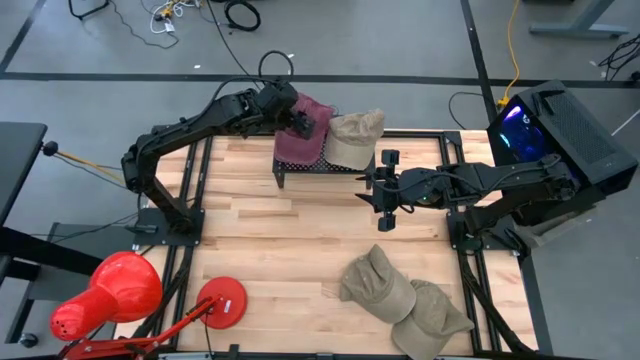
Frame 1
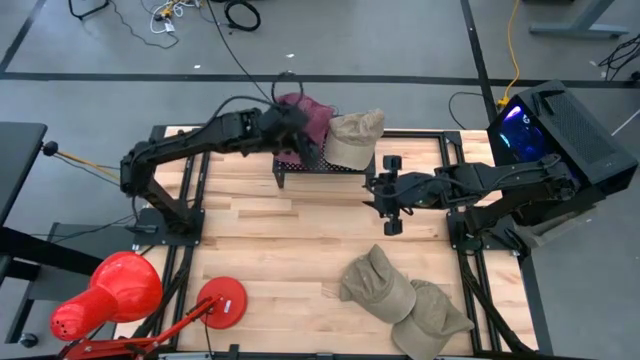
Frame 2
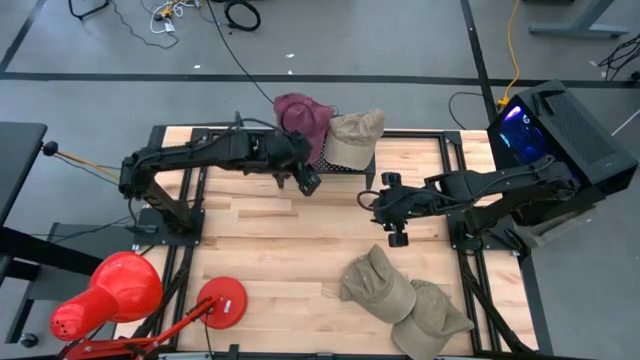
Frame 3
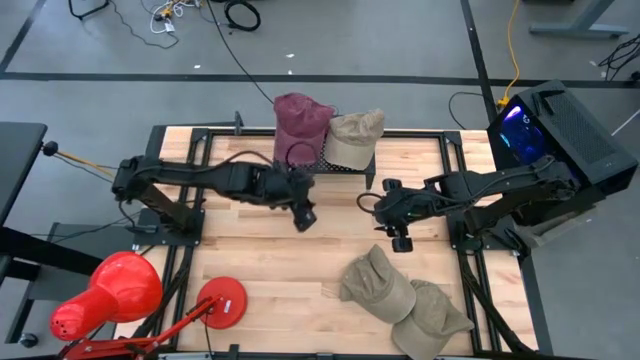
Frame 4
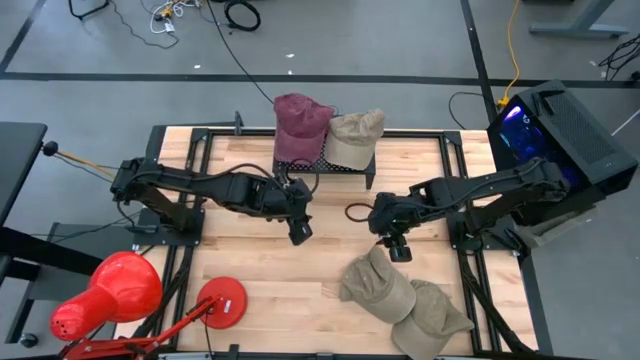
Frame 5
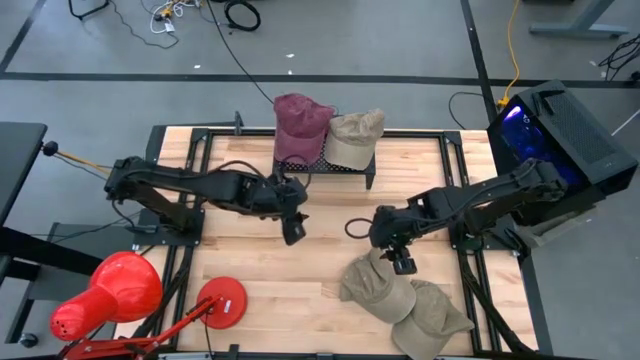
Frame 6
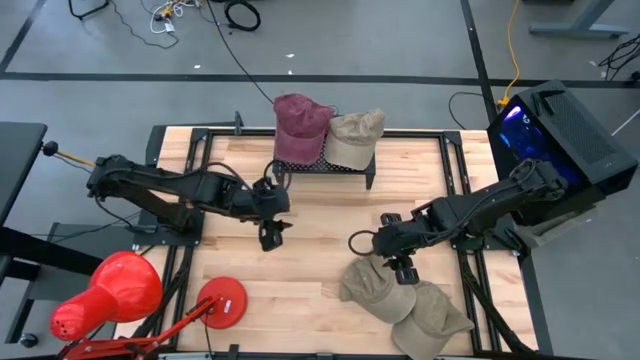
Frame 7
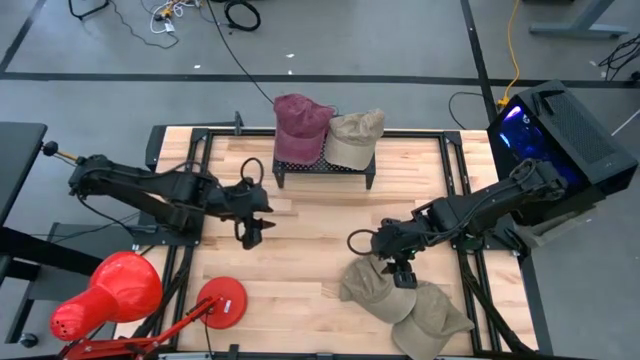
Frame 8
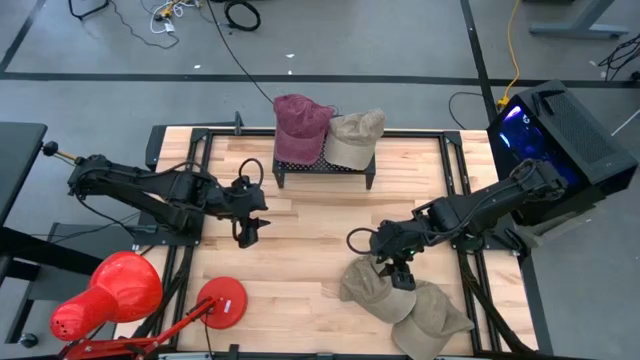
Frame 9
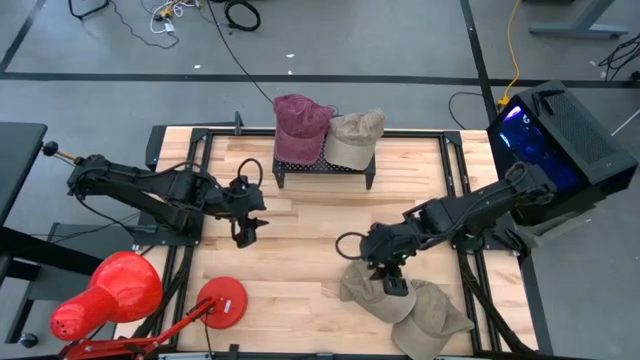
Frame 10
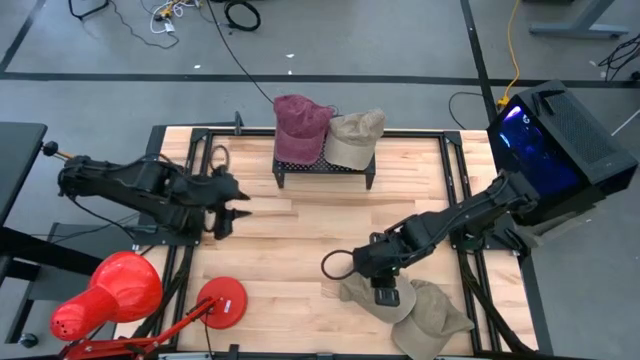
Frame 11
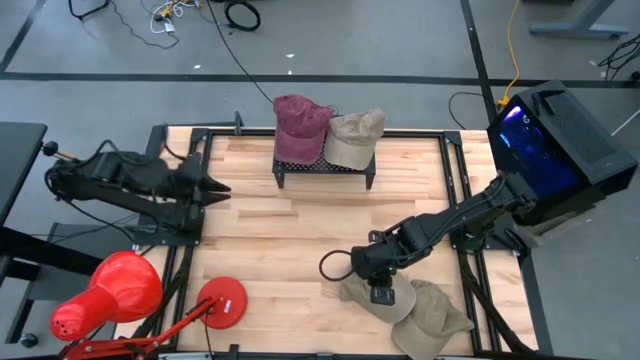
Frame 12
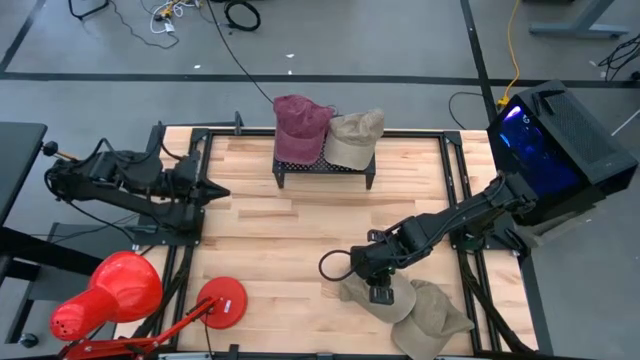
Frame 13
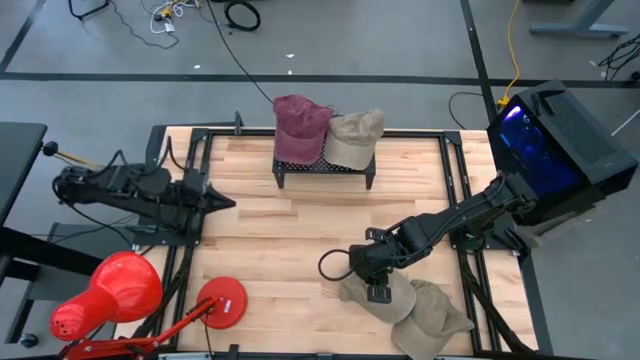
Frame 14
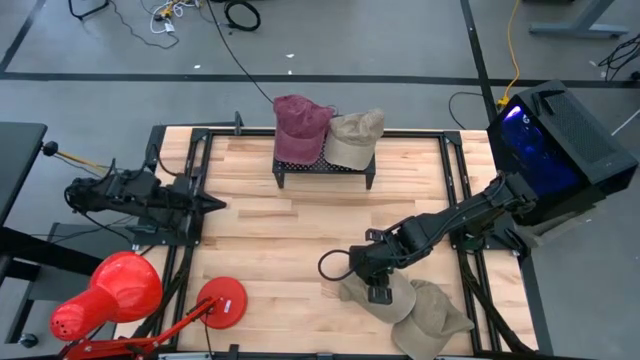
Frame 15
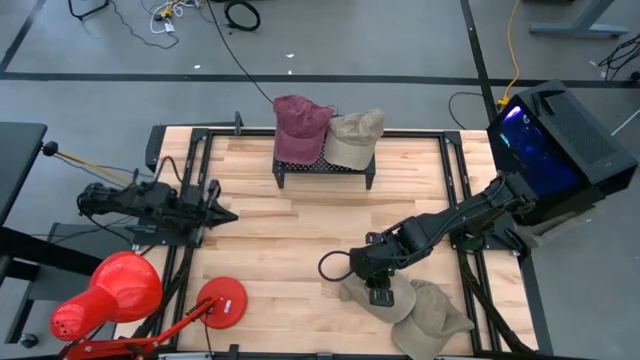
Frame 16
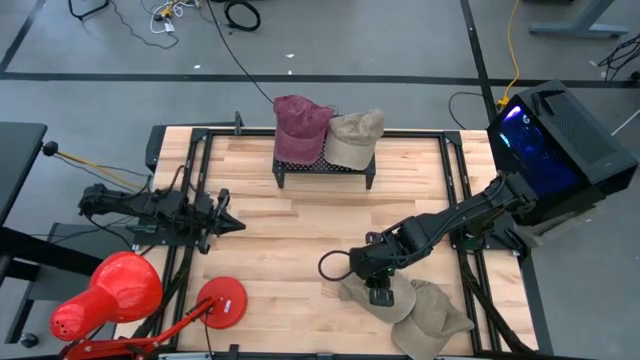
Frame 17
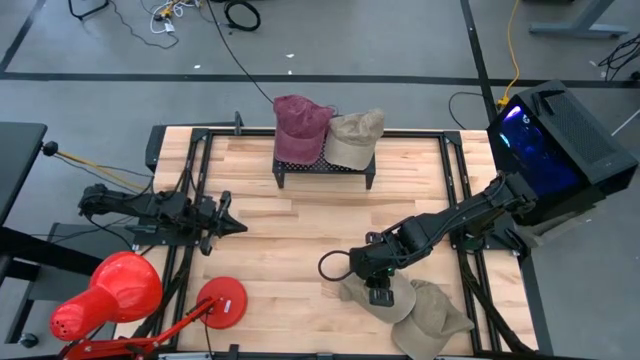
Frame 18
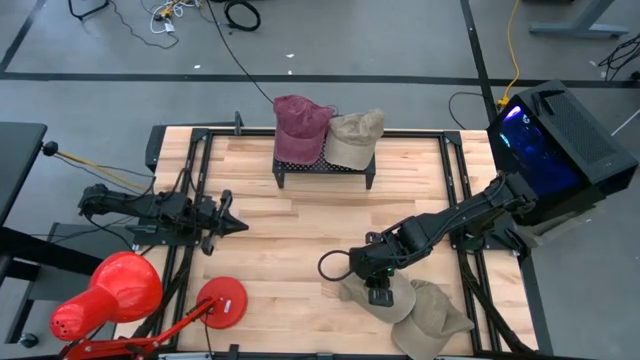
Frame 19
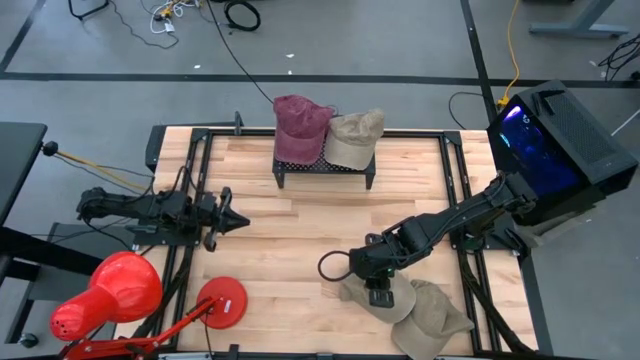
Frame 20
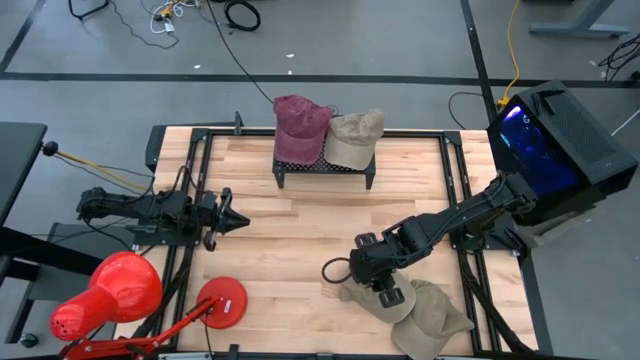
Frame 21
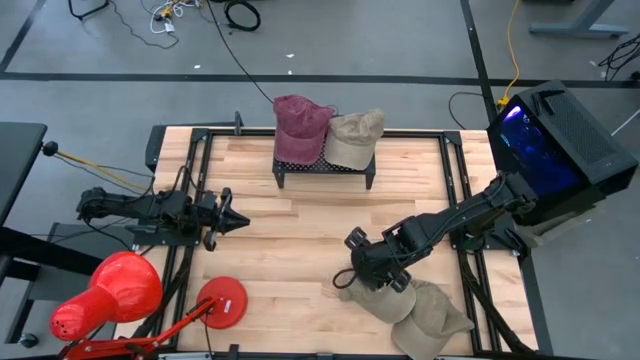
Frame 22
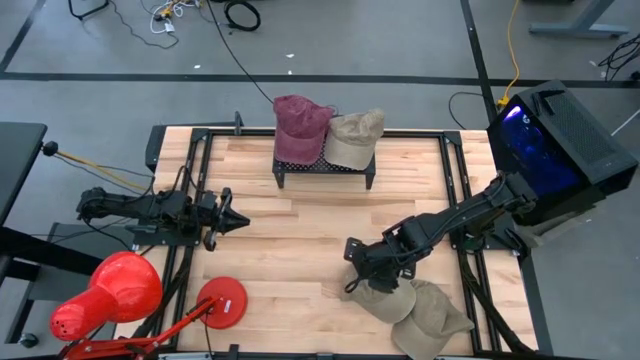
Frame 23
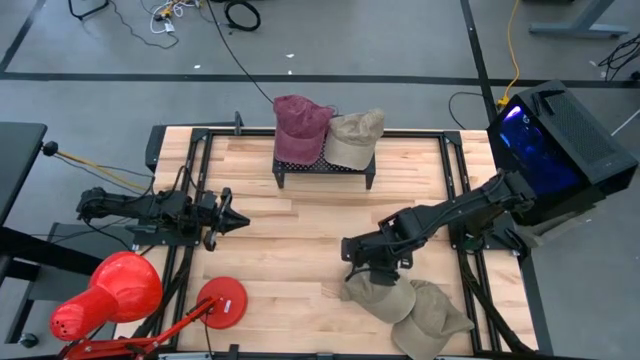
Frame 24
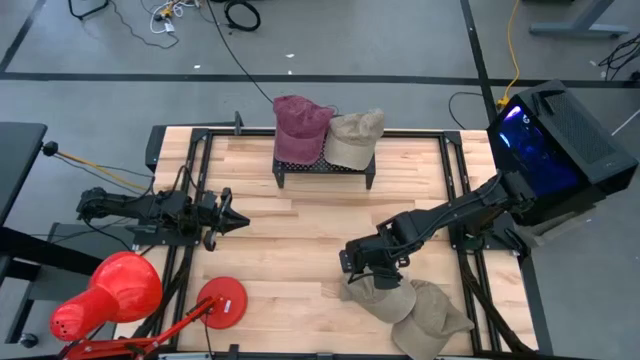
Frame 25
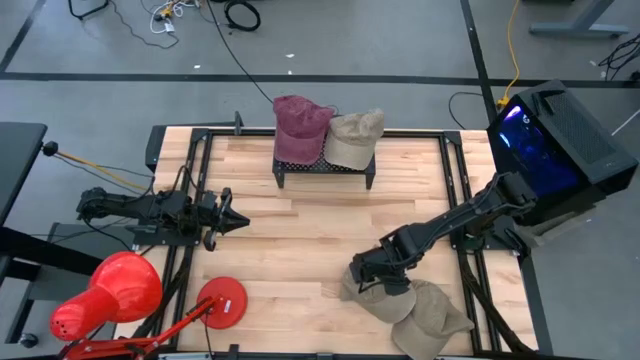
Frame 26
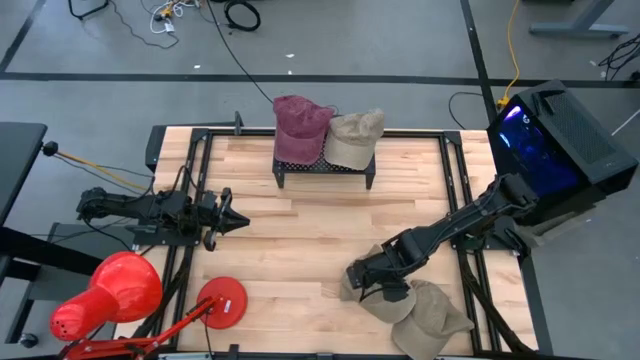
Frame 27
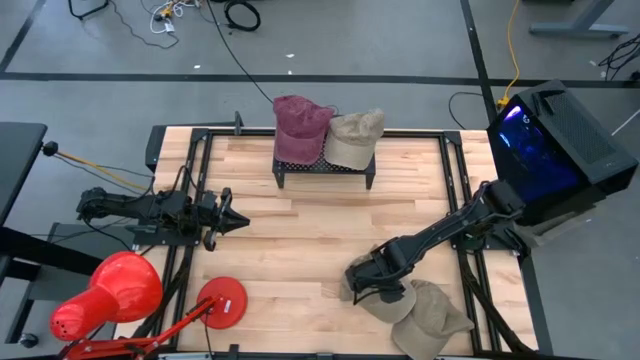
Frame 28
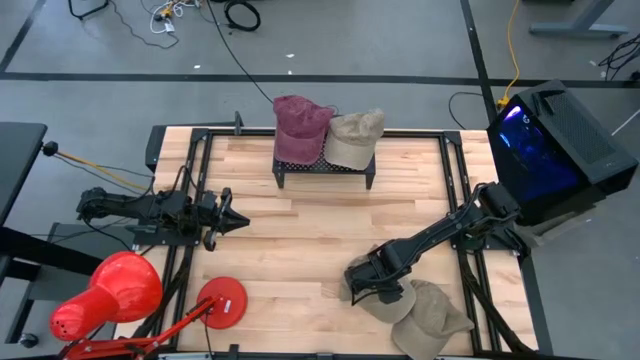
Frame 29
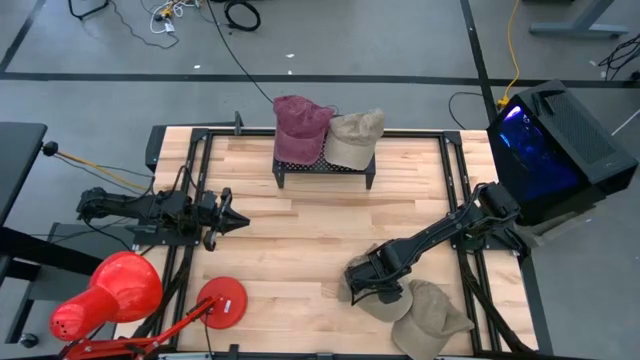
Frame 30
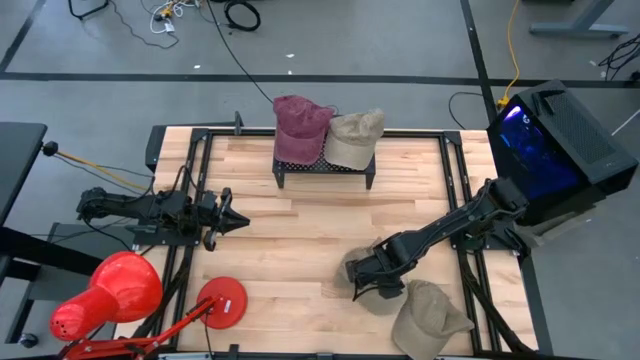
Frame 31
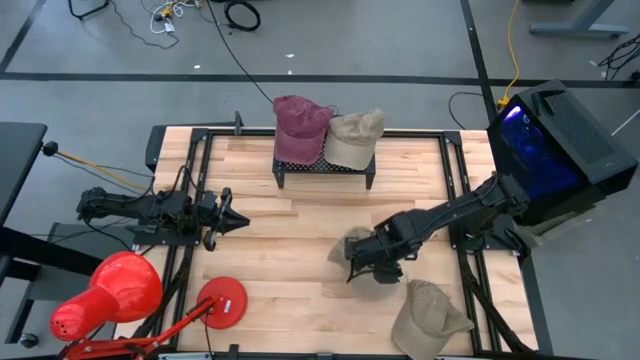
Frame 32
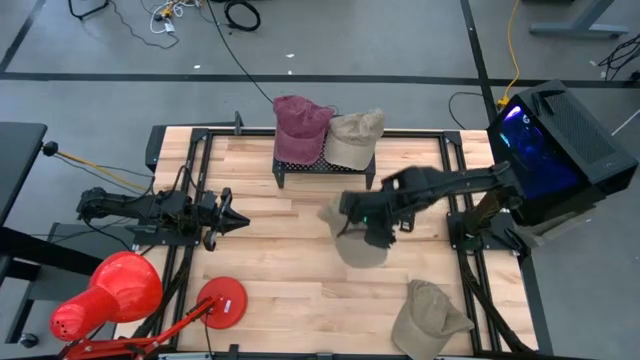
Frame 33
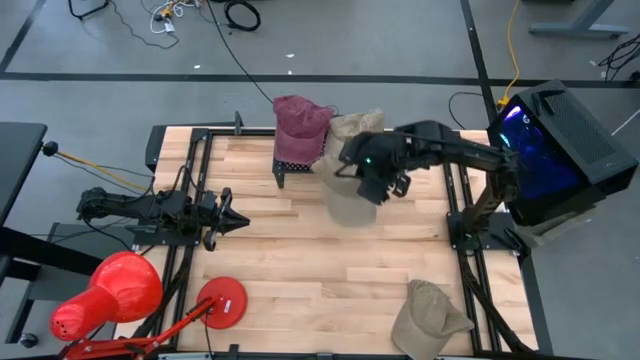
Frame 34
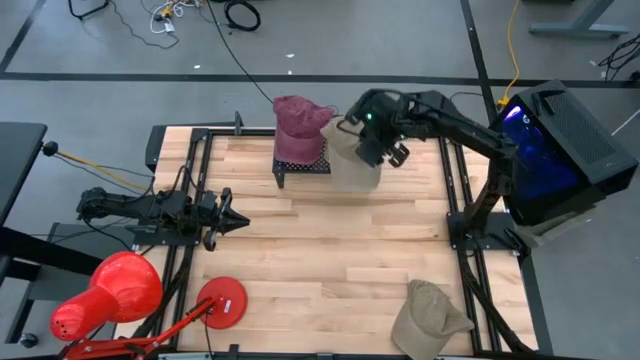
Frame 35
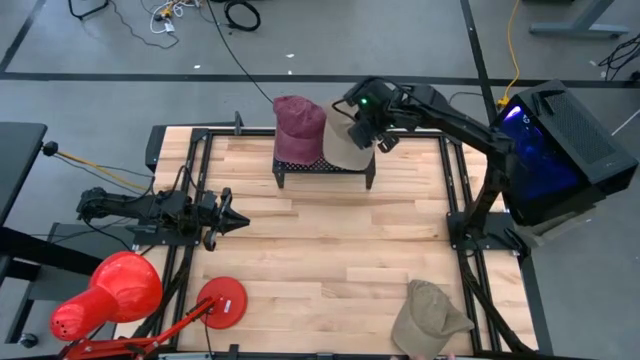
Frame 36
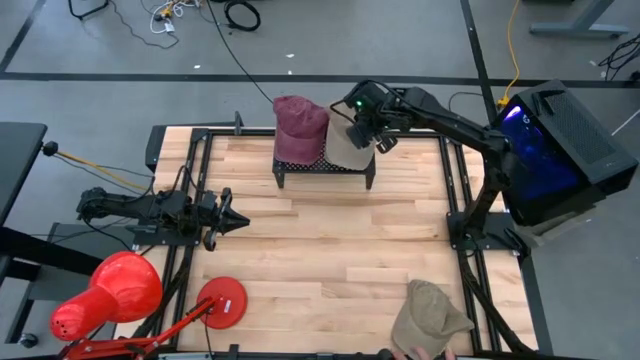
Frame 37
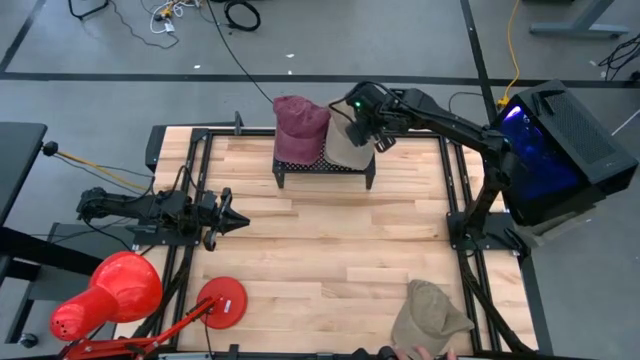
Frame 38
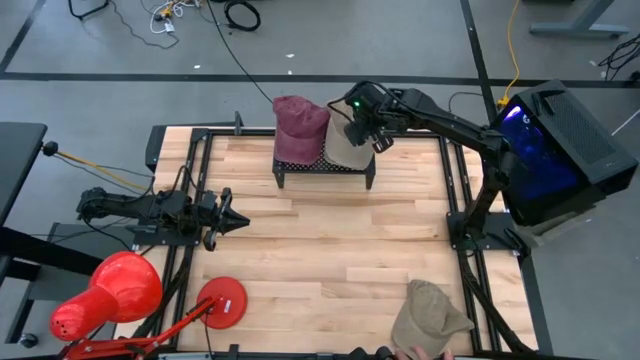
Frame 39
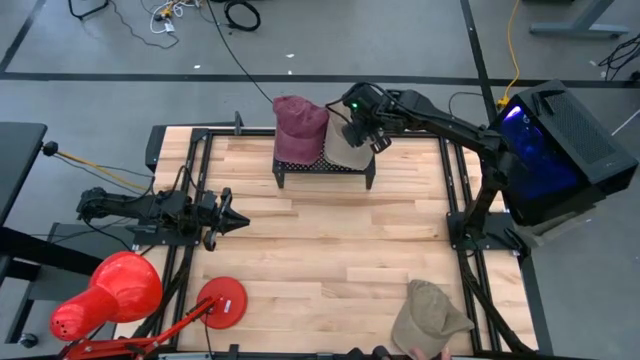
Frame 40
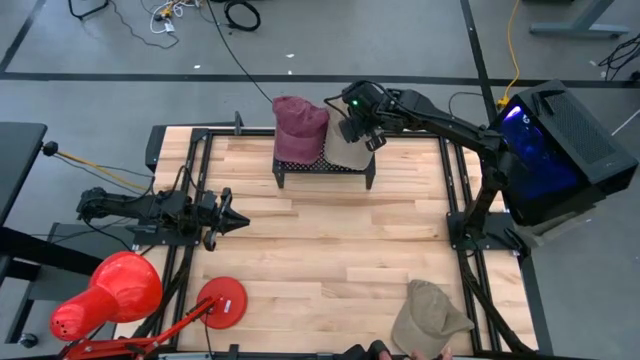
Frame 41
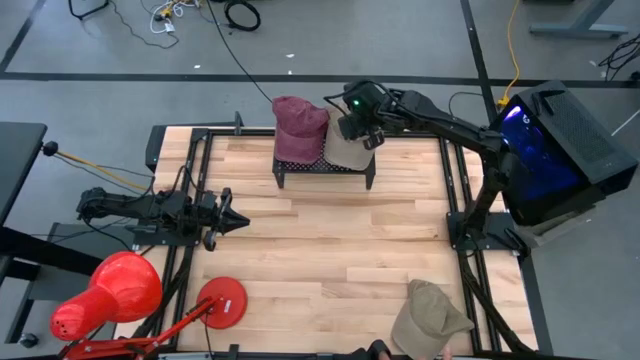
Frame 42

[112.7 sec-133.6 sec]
Task: Pick & Place hat
Stack the left brown cap on top of the brown cap on the shelf

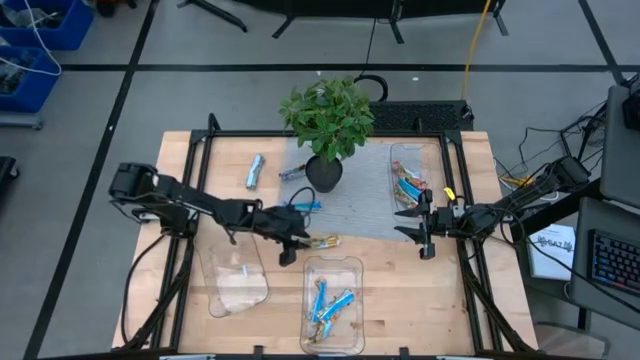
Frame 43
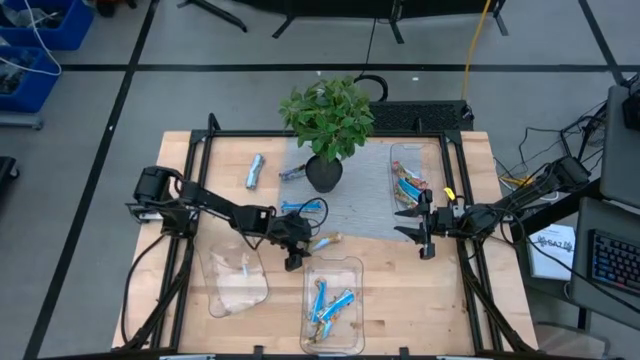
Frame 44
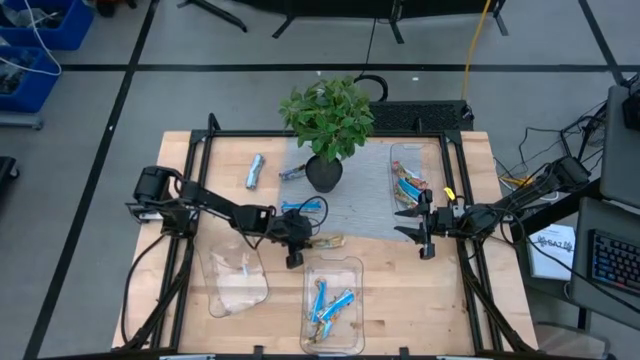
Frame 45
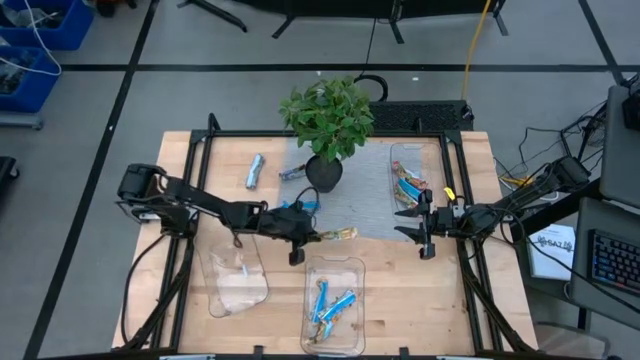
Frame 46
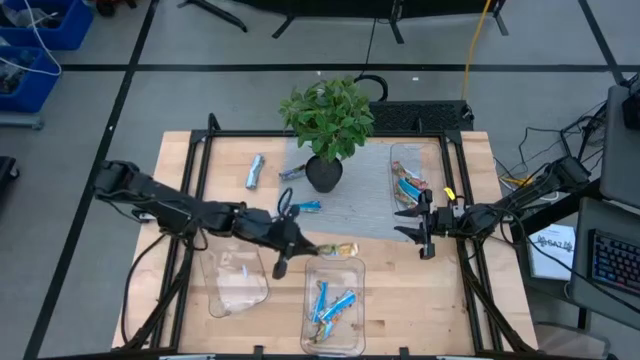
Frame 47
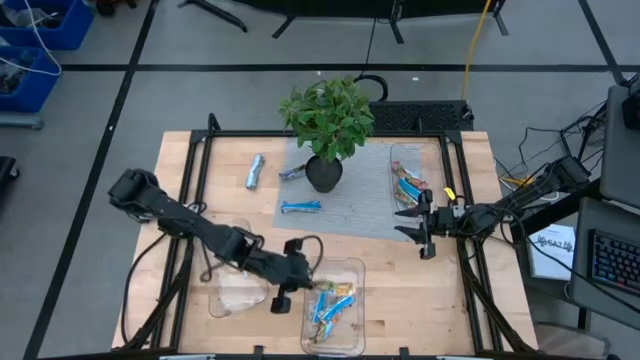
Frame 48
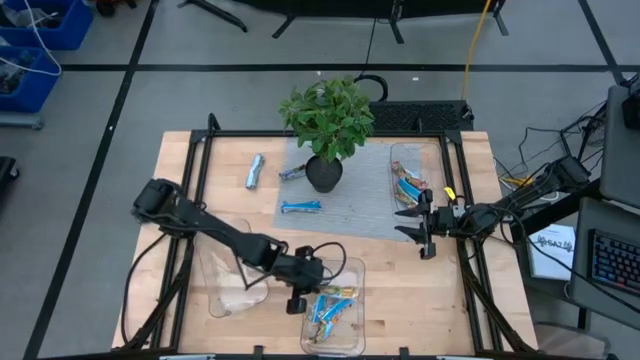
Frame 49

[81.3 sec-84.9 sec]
Task: Pick and place Granola Bars by type
Put the yellow granola bar into the middle transparent bin
